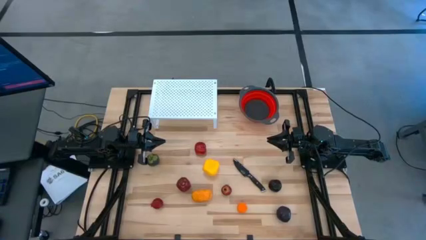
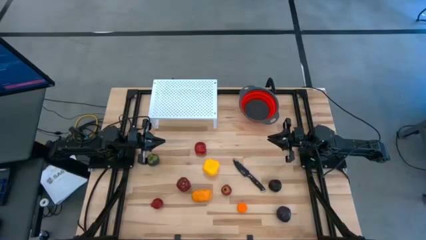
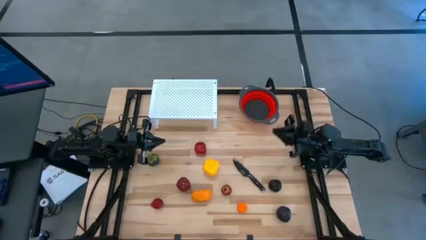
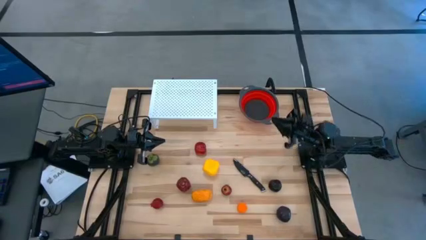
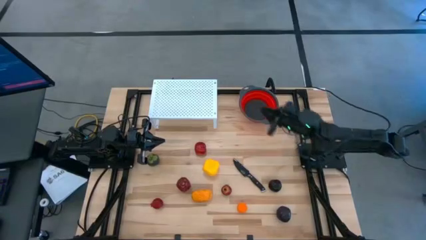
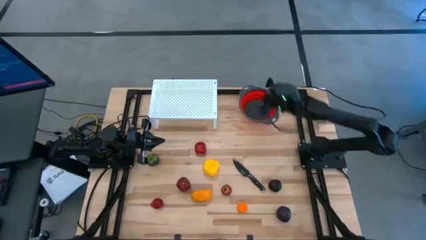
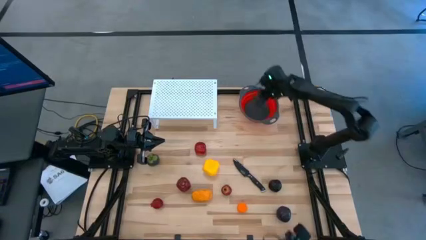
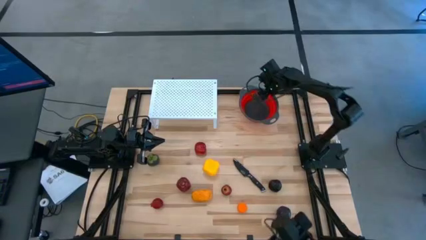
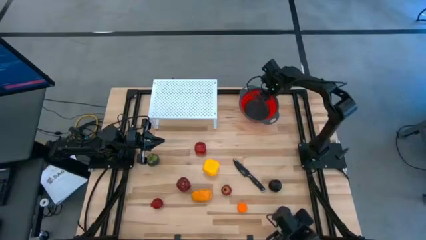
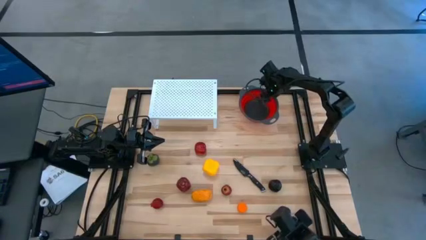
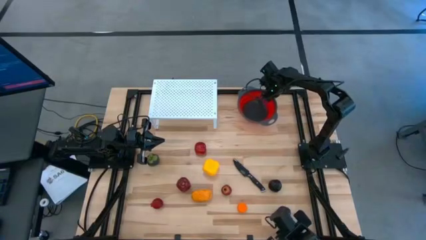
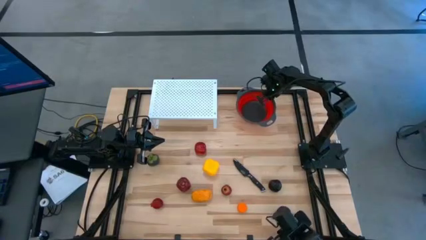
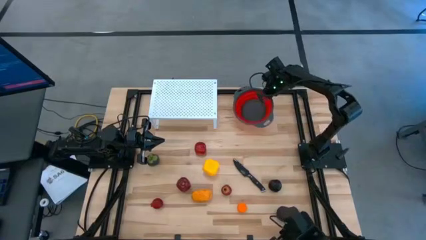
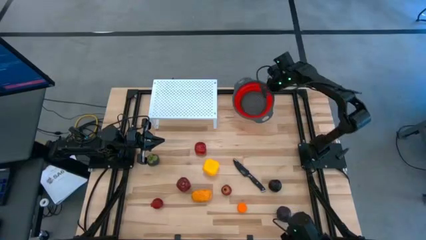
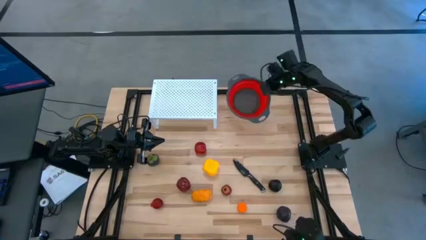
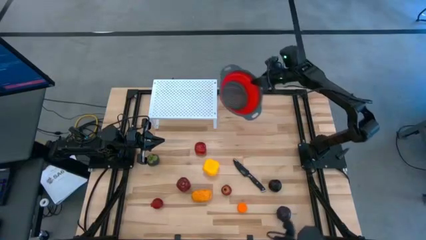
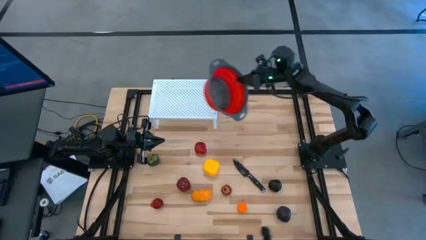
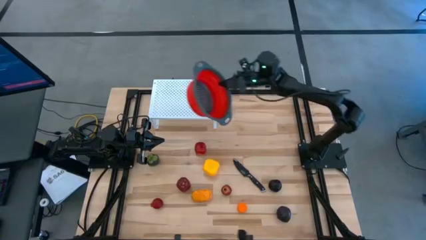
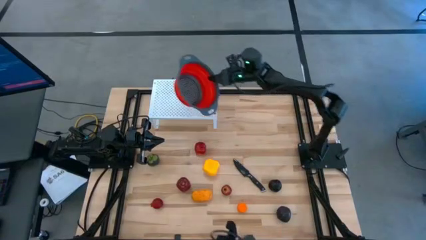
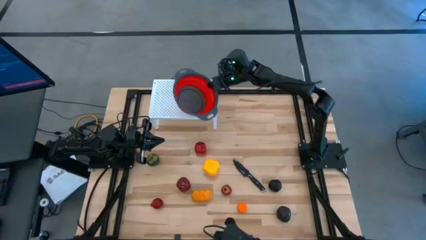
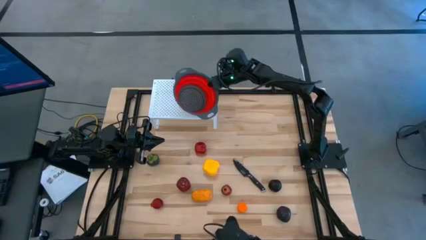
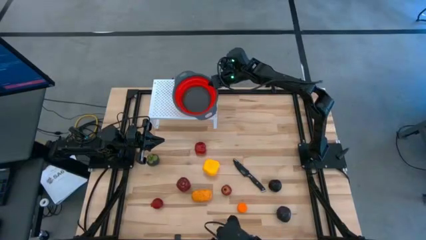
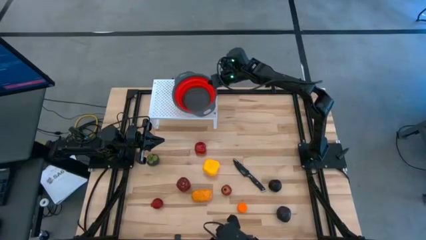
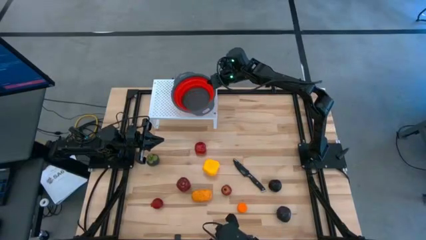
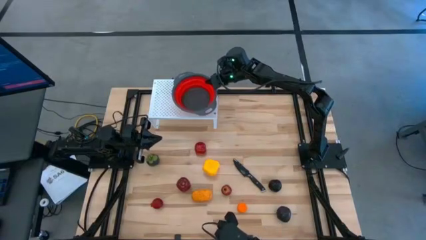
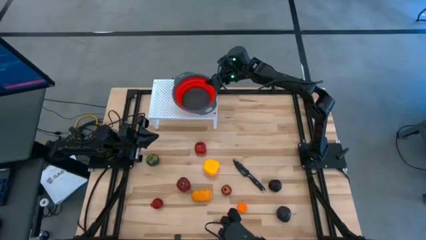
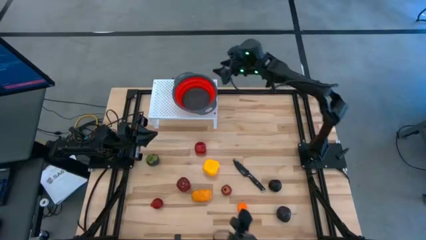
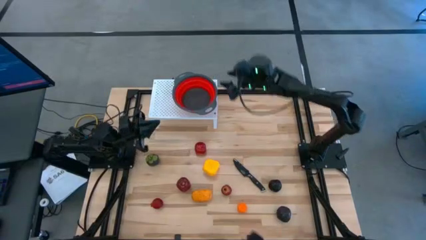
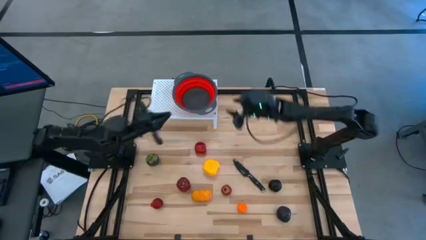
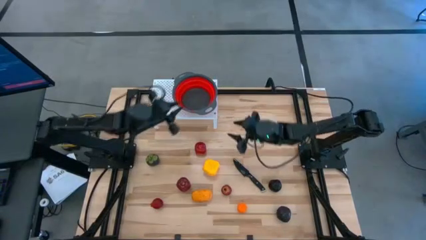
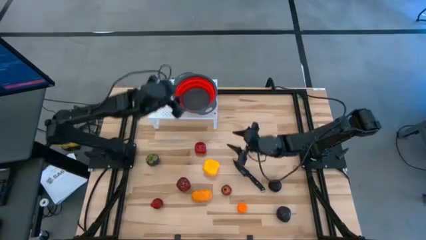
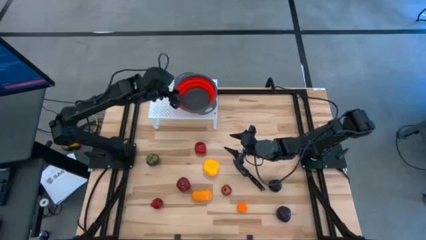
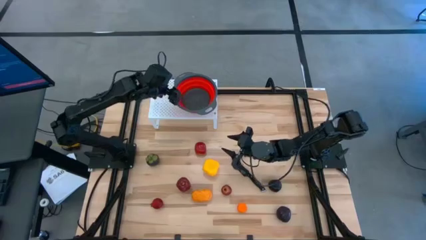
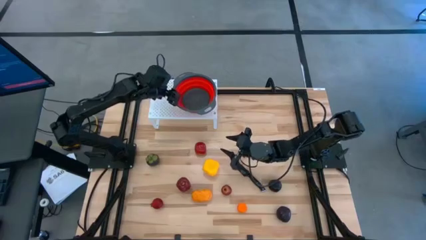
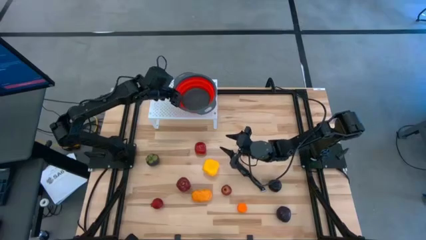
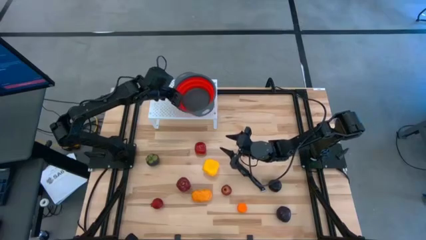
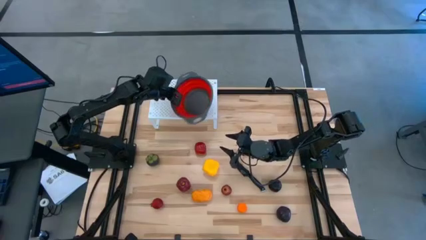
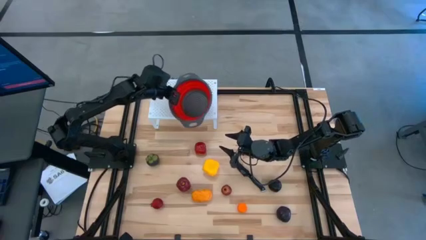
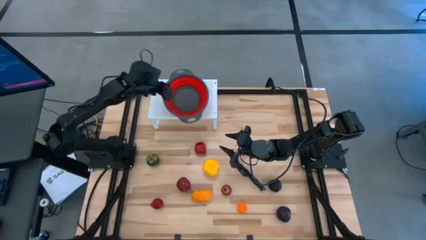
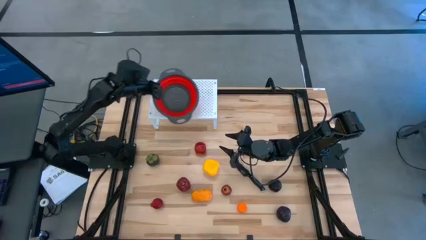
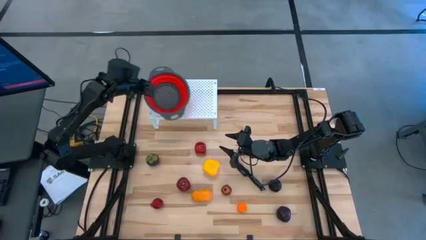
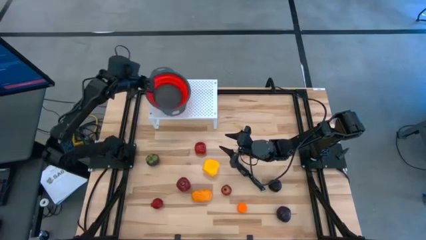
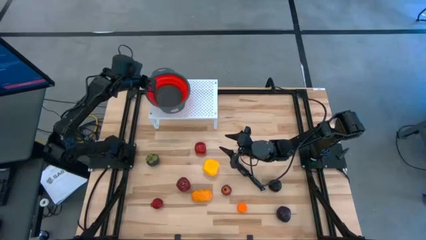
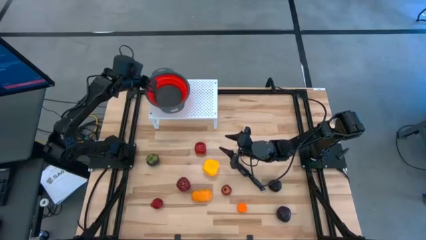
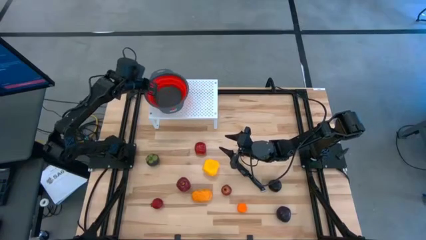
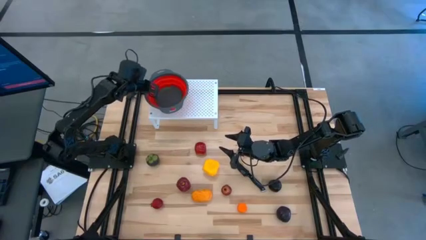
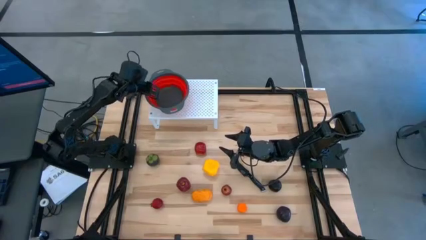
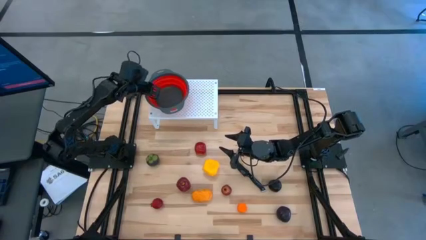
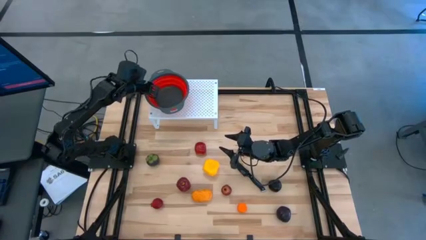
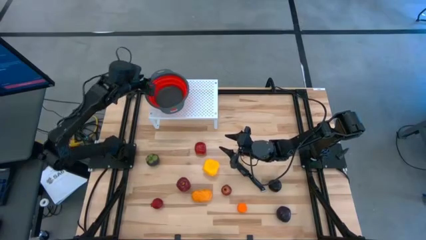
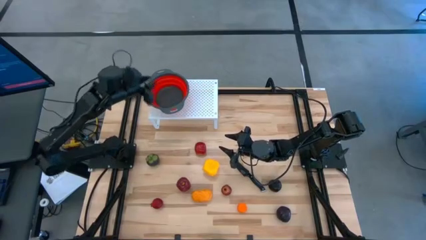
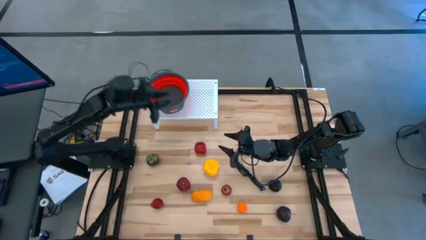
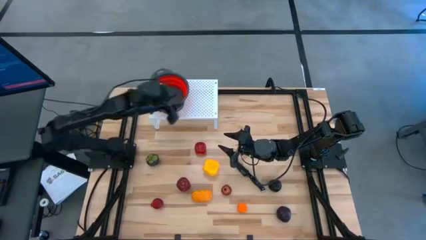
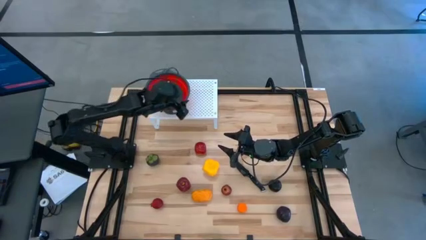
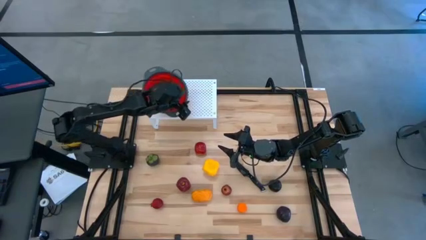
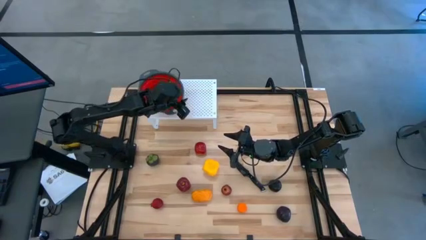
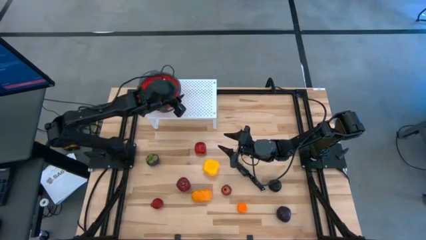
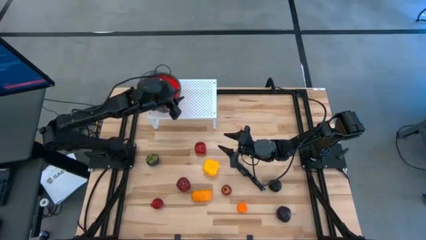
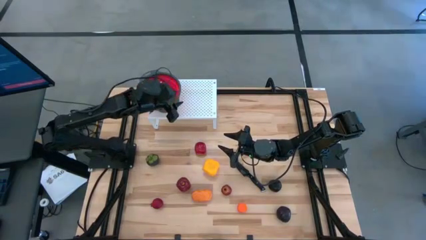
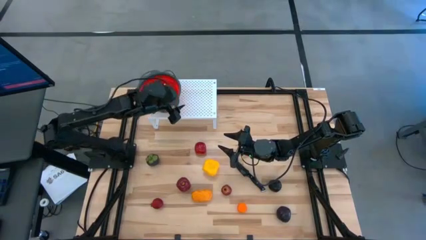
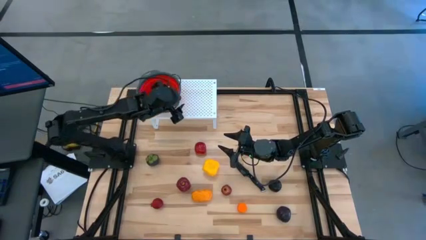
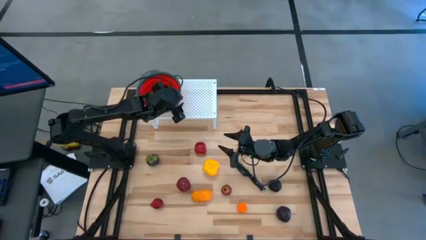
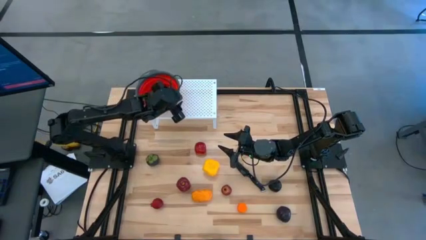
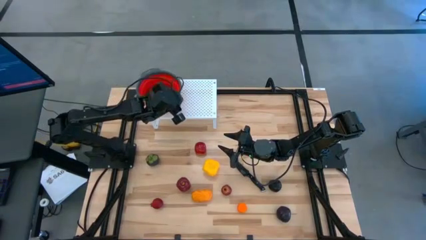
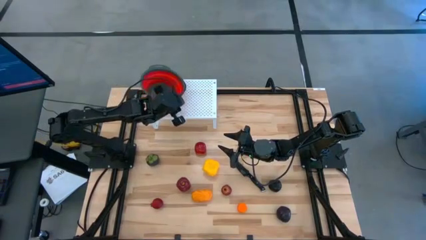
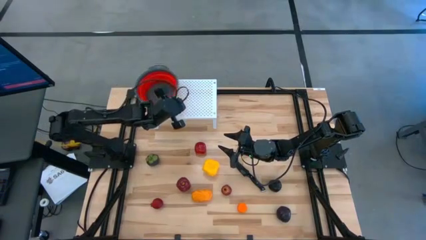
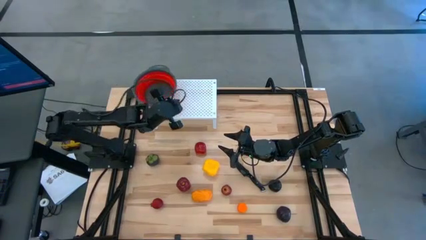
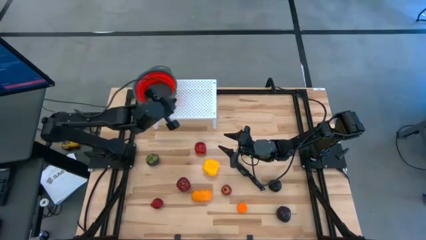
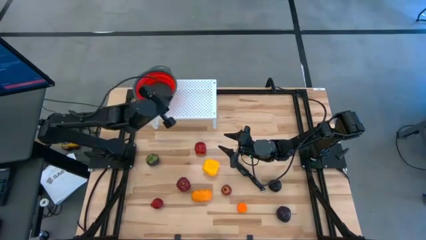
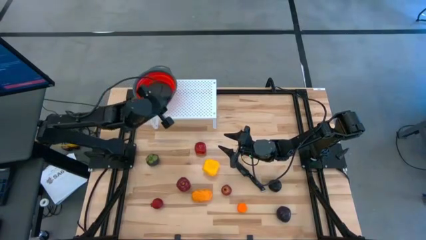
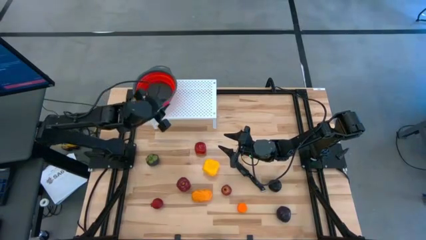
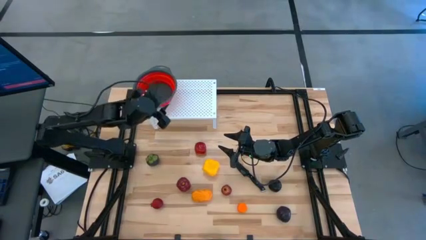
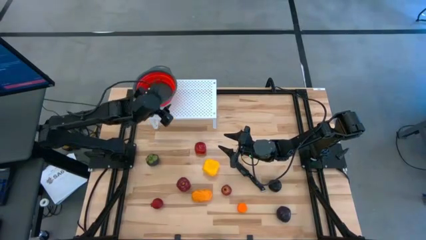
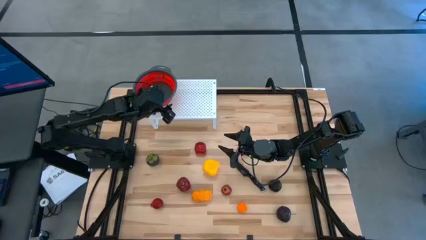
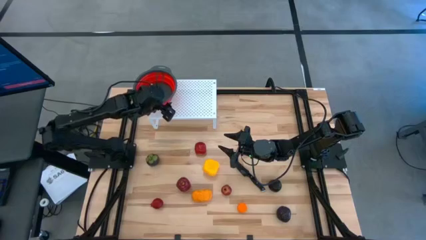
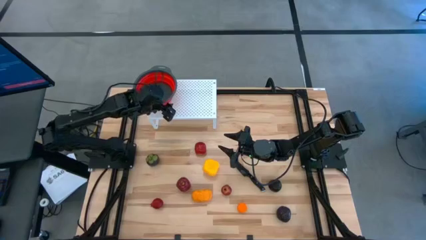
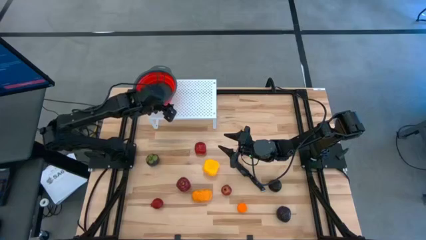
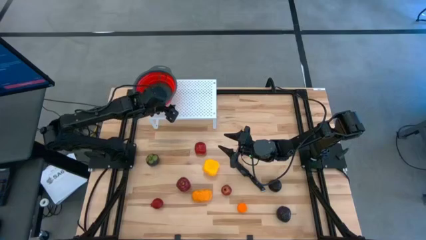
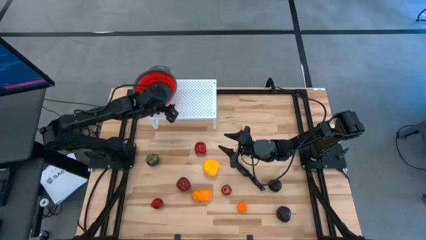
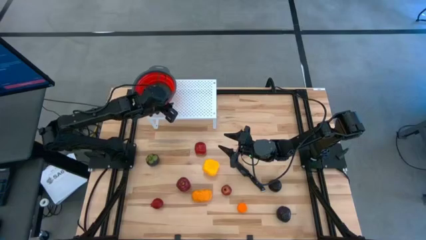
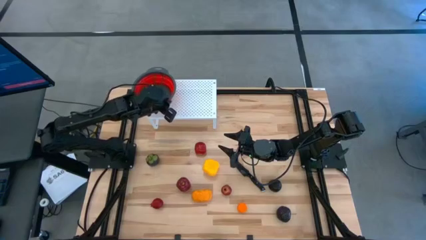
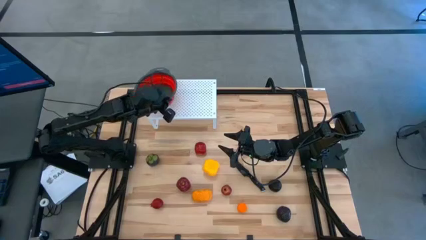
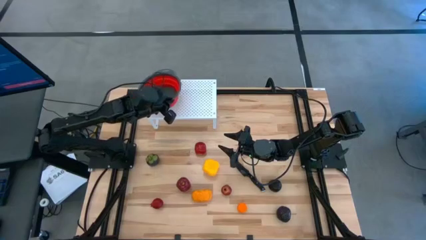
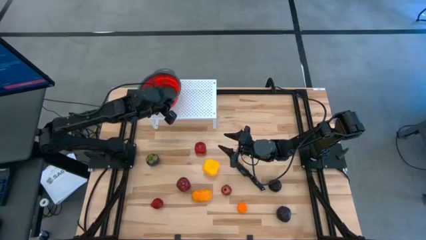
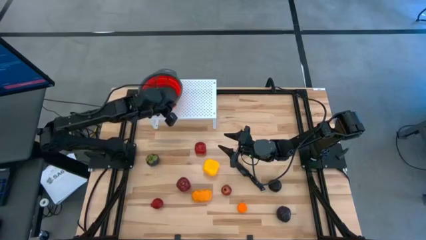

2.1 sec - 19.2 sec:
Task: Pick & Place Fruit
Put the red strainer bowl on the shelf
